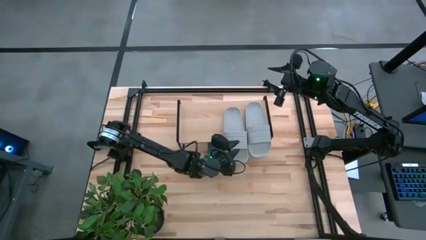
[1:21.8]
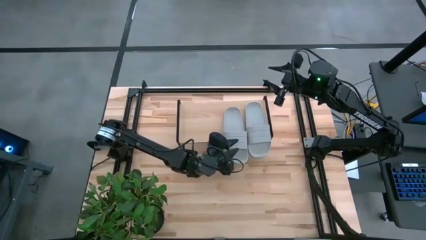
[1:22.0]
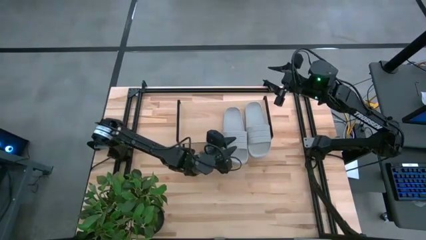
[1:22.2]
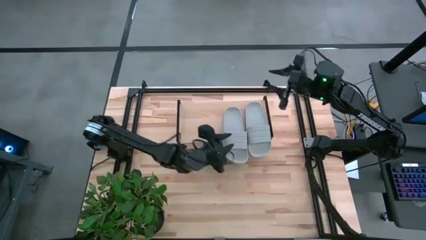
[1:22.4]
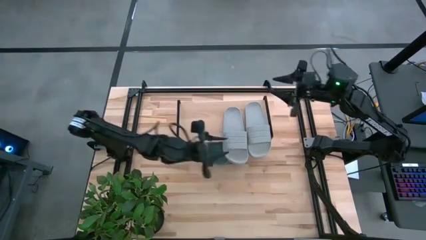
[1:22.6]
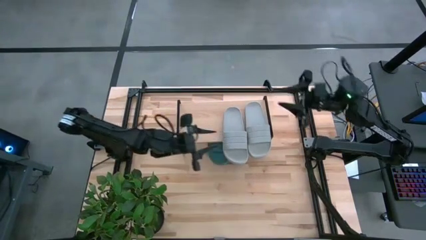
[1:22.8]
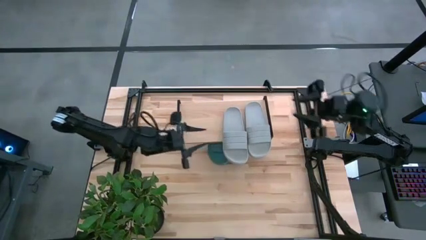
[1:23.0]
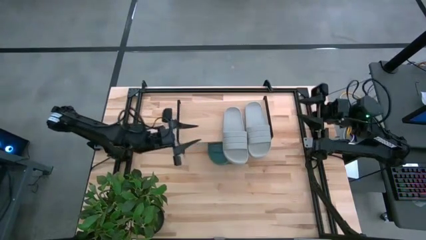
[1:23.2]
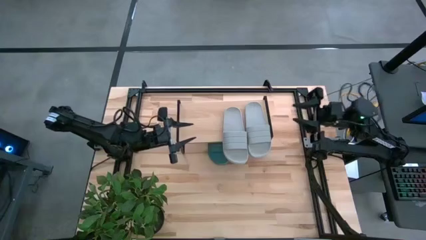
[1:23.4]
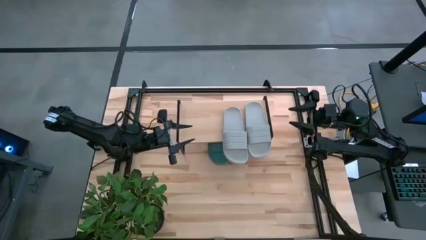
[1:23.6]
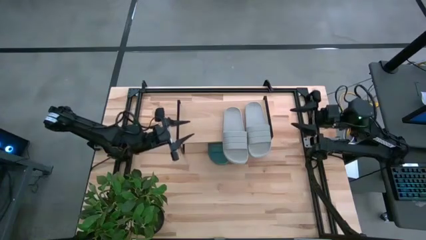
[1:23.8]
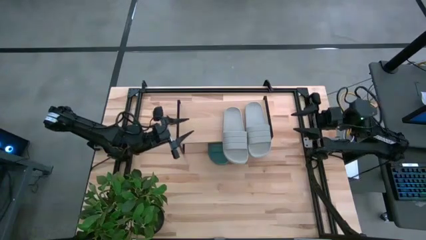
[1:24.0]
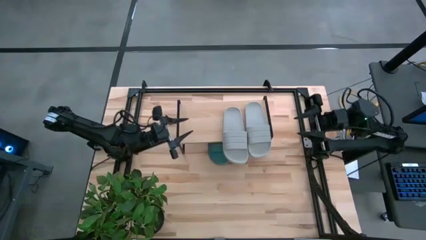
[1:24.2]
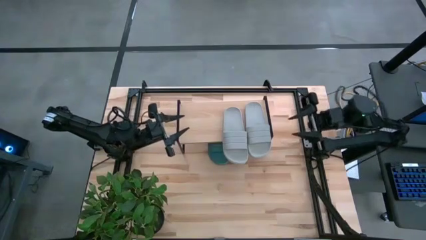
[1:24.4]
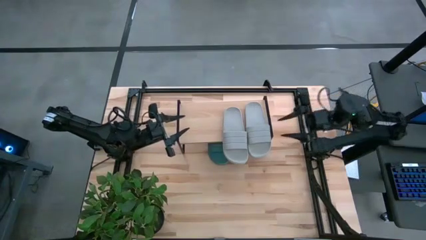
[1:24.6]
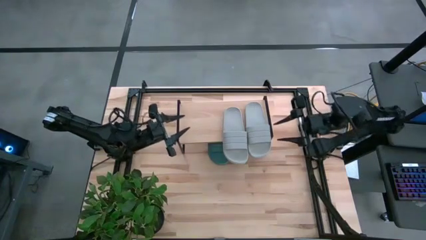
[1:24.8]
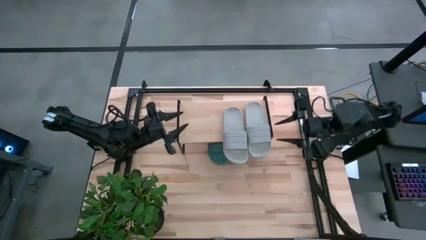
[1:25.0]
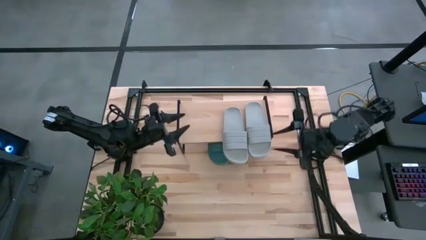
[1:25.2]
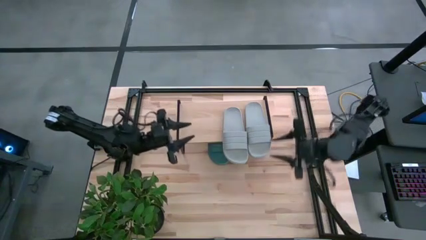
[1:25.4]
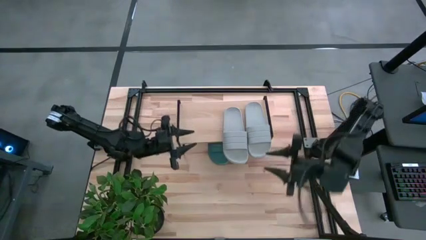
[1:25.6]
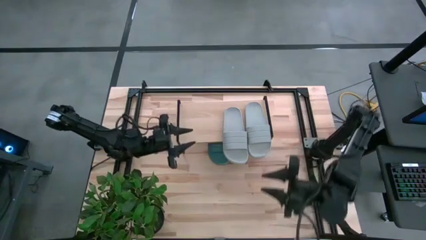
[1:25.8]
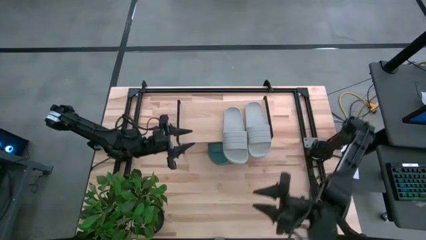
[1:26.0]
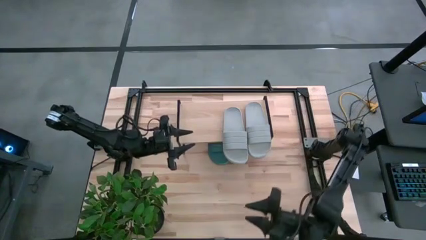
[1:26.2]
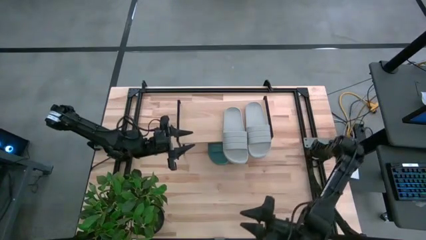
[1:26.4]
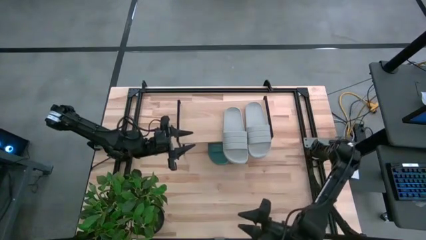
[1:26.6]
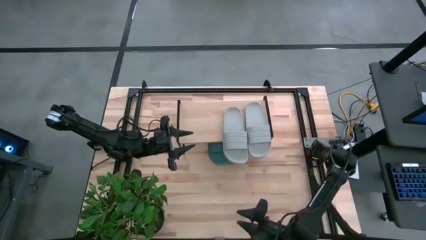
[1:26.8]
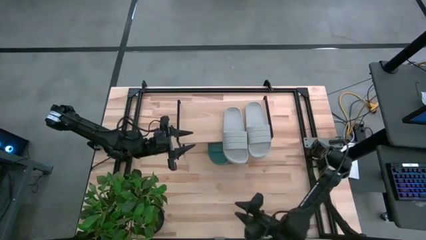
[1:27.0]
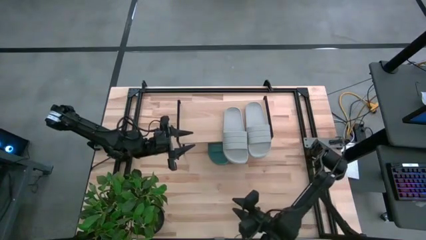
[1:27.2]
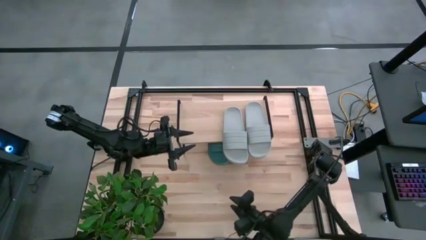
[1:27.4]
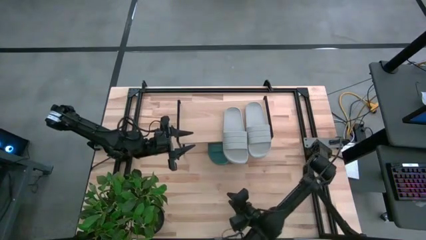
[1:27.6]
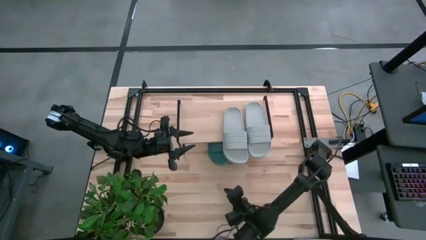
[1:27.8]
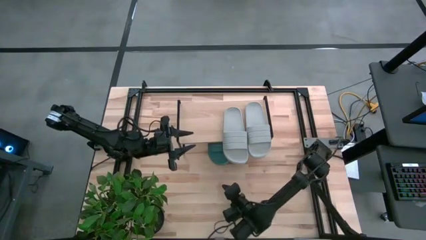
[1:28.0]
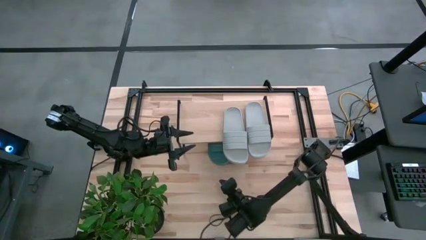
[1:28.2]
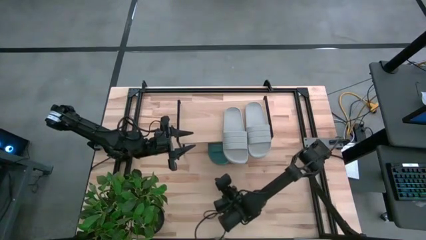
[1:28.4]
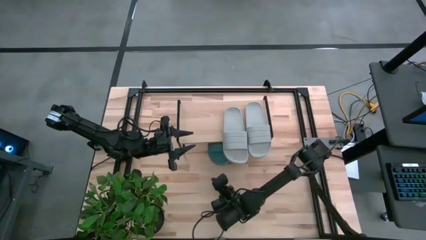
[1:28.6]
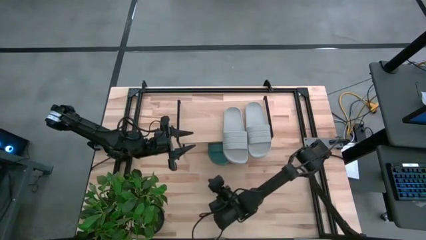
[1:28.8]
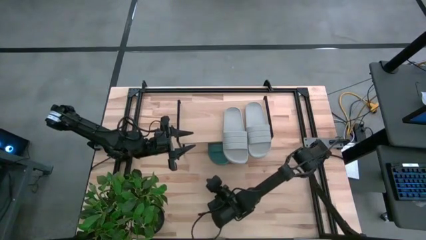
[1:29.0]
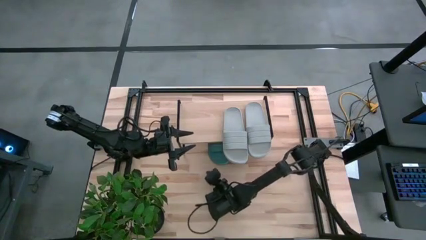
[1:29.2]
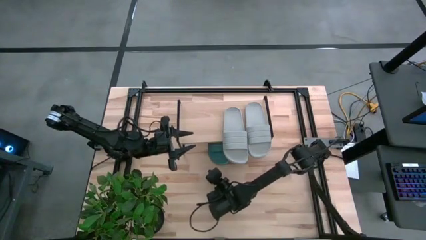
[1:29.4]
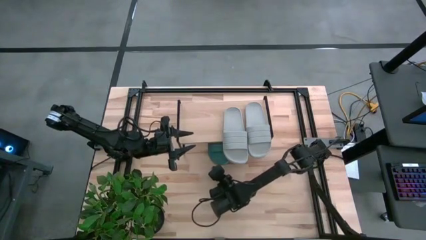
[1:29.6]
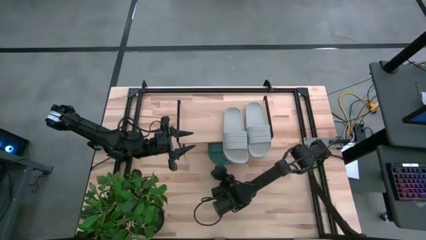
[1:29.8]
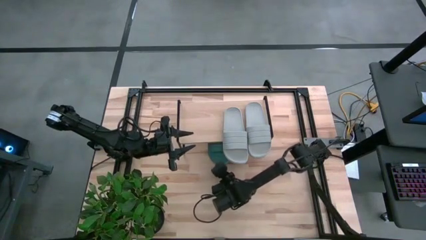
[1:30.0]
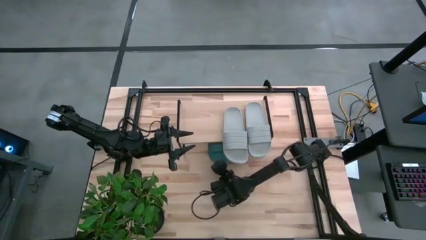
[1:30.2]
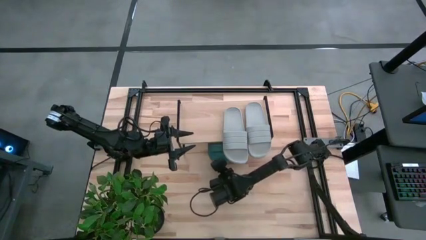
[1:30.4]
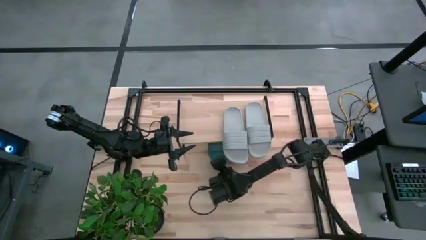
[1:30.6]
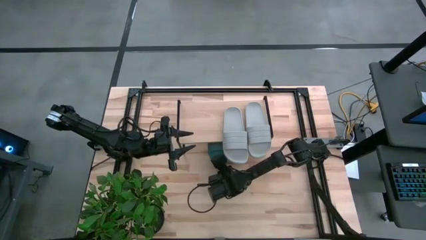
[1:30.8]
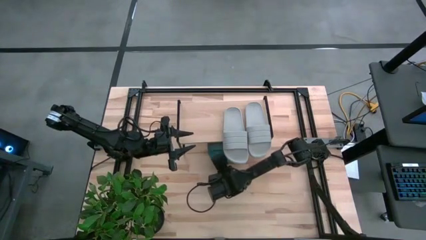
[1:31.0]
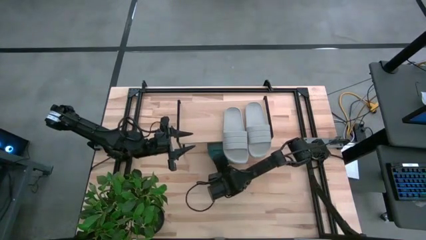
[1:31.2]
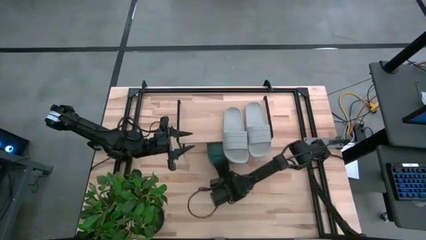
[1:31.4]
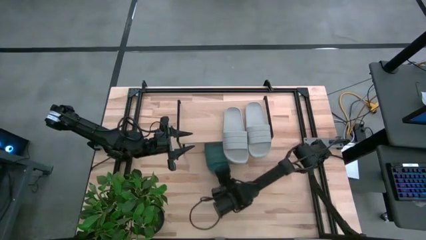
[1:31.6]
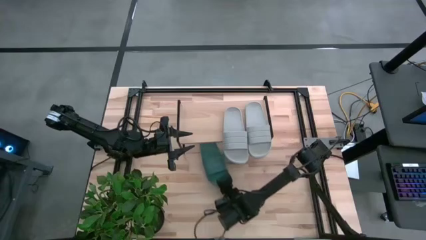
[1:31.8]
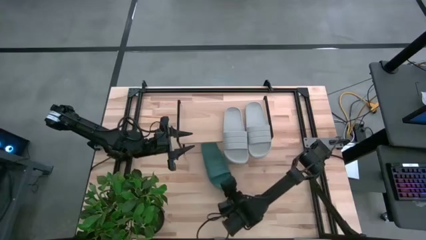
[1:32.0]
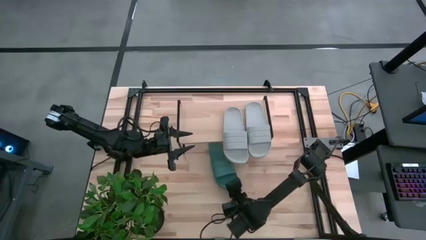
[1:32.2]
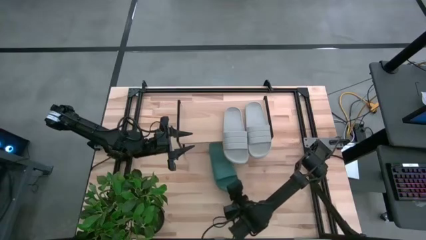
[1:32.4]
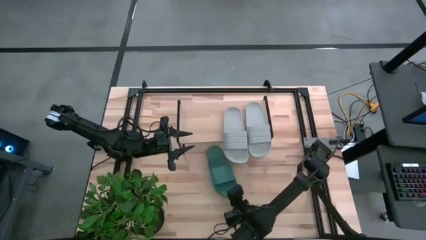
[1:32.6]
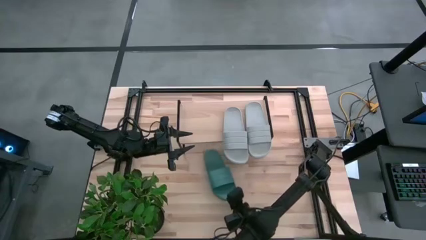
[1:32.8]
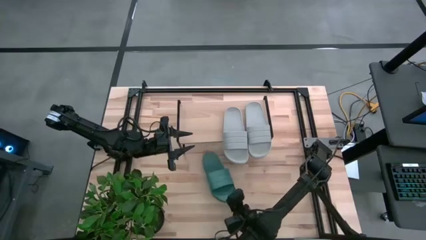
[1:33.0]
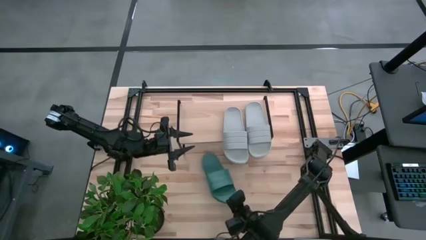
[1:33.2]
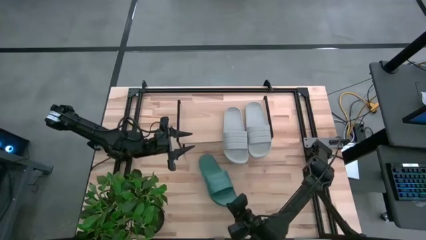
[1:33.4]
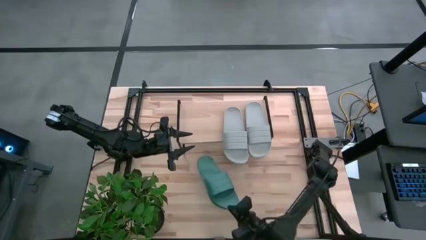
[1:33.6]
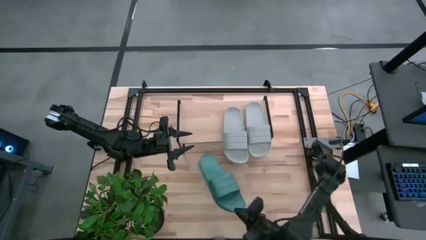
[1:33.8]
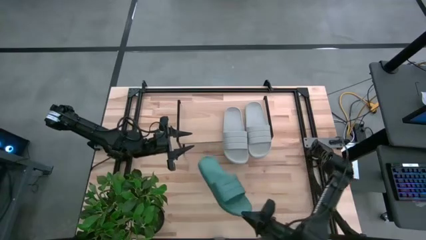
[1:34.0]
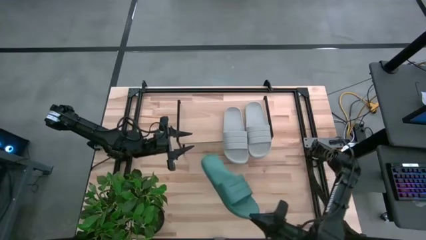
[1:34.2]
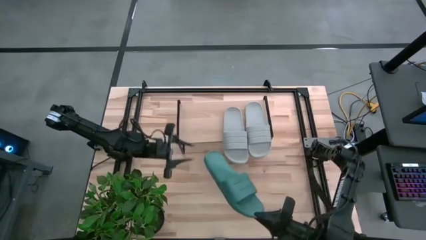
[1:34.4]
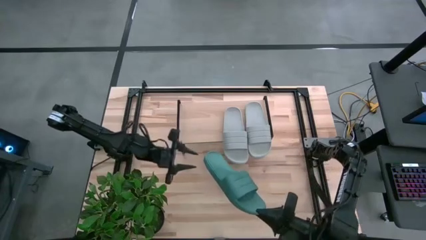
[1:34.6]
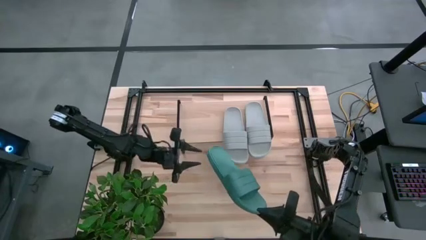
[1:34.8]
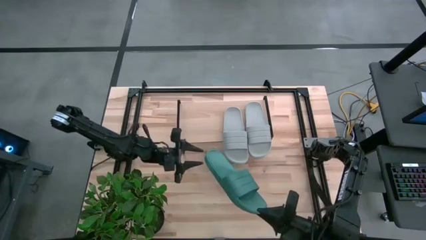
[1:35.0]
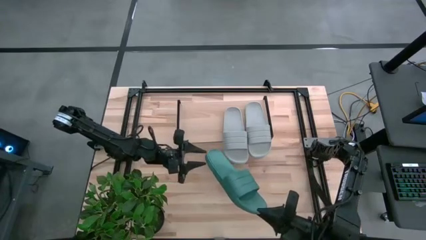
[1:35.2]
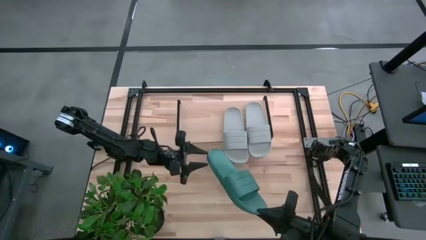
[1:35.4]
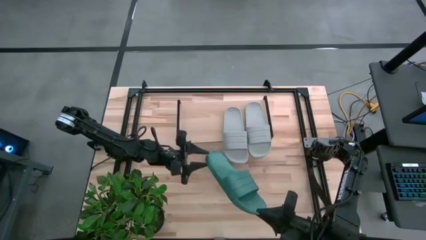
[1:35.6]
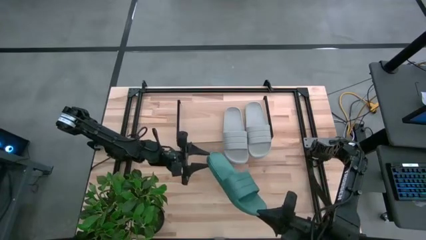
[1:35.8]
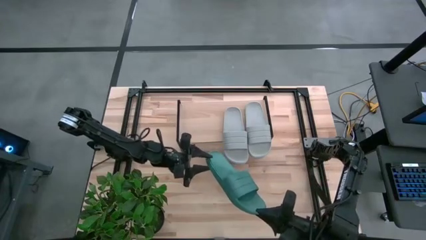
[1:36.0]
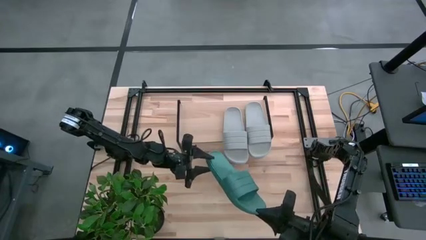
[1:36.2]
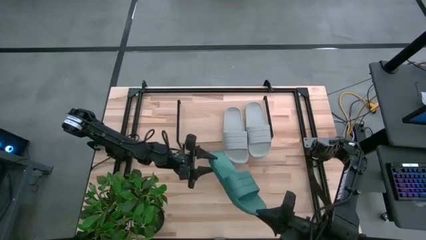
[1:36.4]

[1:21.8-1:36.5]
Task: Pick and place slides into the shelf
Put the left green slides on the shelf

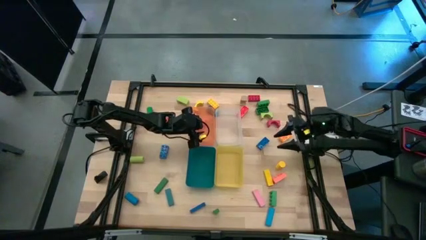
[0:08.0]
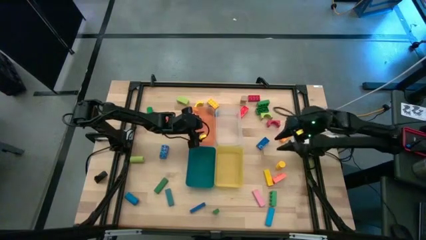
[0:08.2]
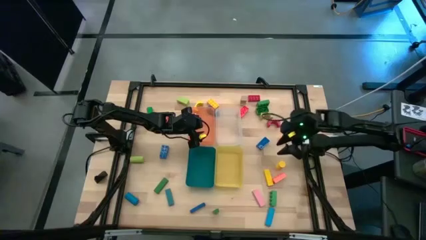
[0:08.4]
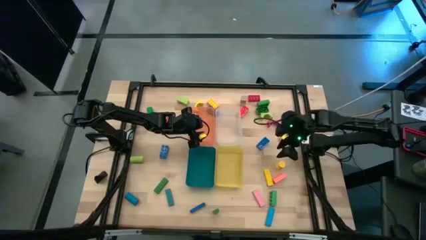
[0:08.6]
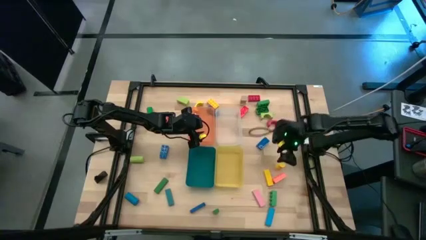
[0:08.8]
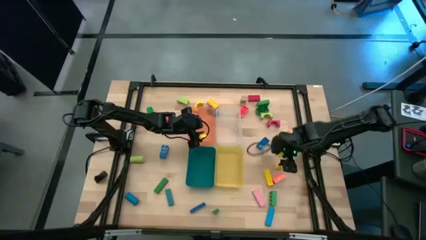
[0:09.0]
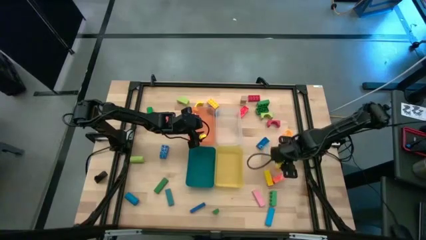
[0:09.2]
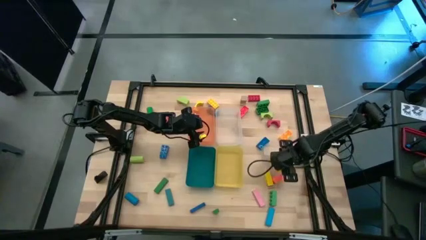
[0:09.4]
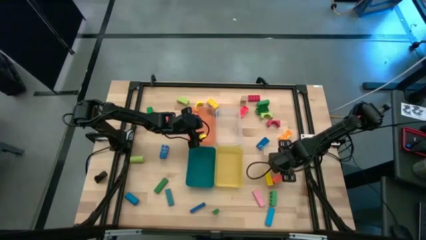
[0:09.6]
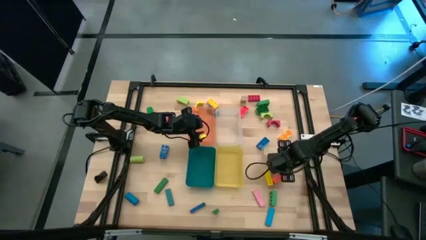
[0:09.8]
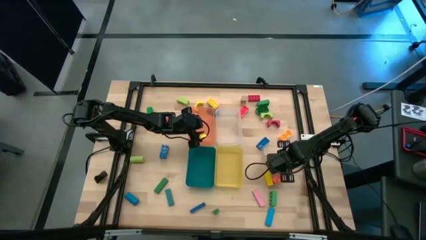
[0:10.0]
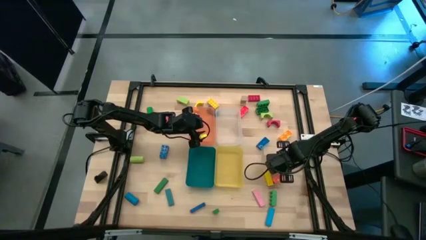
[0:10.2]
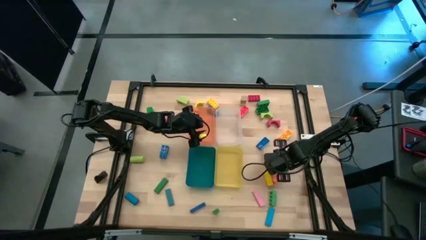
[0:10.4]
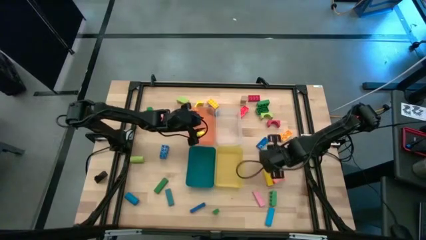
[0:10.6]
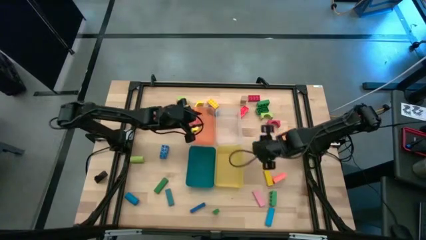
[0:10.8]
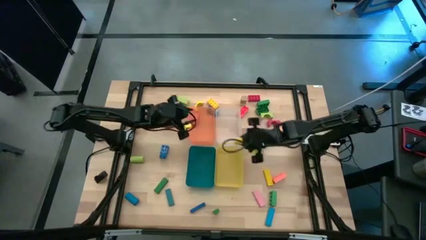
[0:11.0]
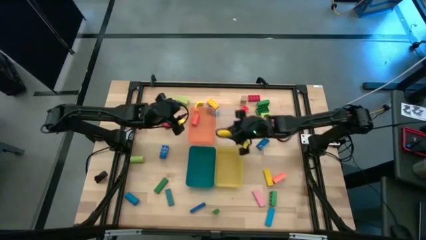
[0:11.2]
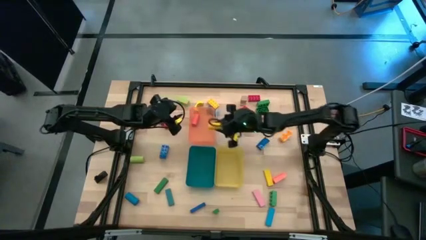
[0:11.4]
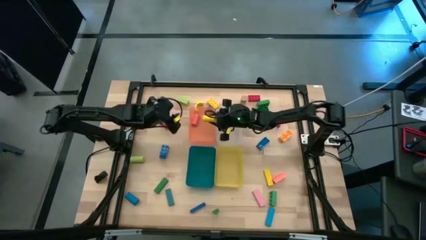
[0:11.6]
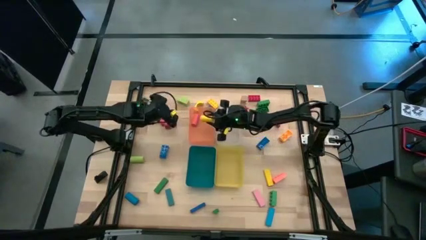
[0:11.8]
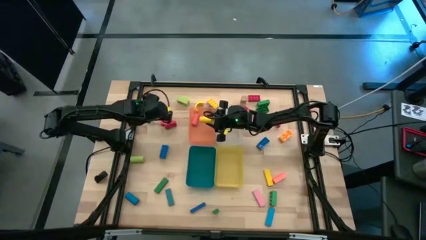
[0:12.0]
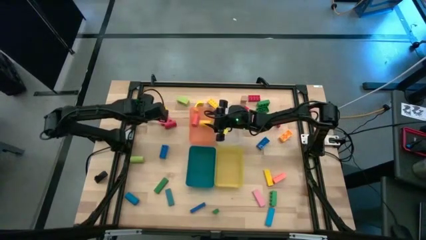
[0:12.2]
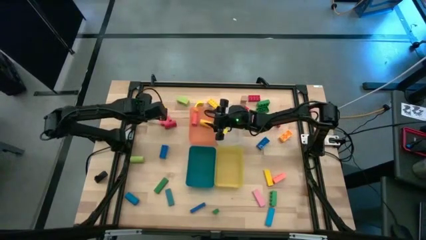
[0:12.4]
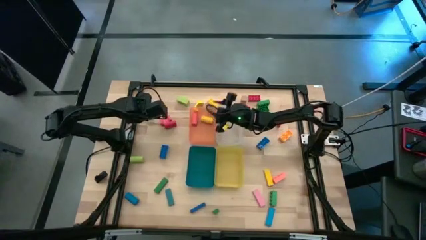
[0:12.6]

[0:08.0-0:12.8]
Task: Sort blocks by size
Put the yellow cylindrical block into the orange bin
